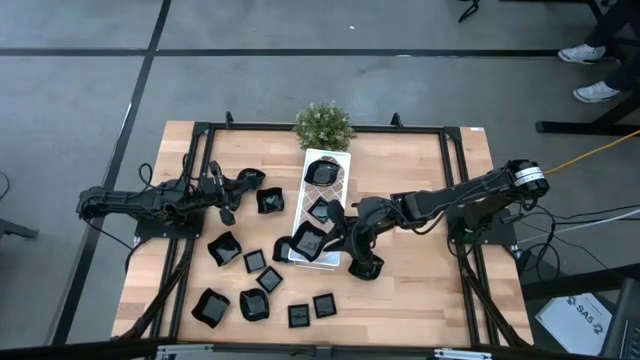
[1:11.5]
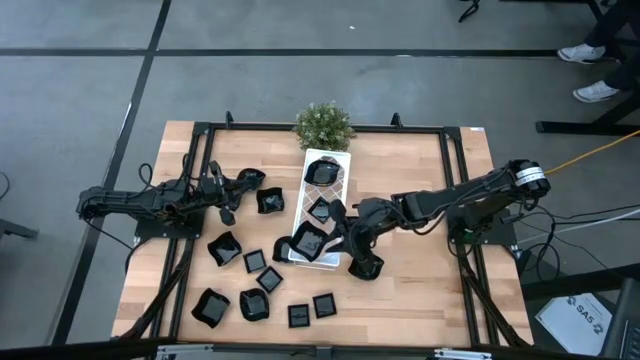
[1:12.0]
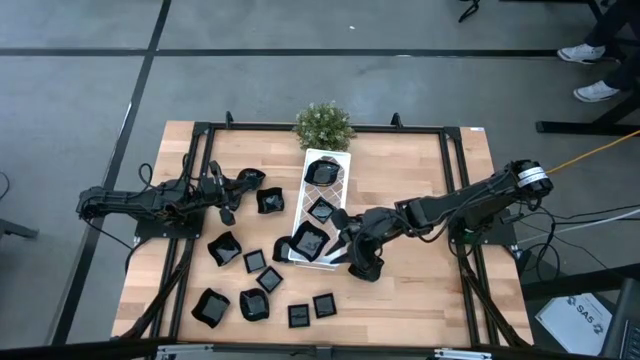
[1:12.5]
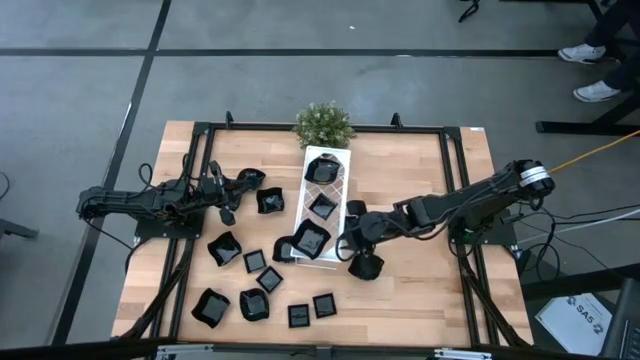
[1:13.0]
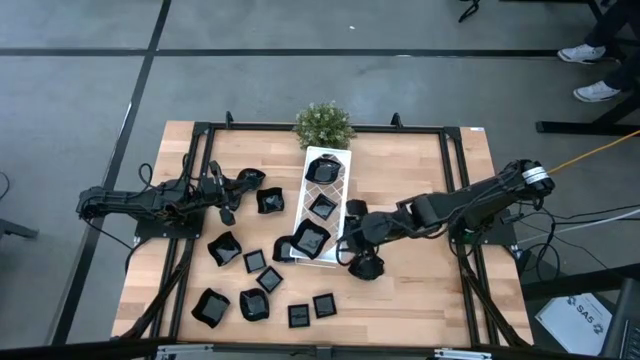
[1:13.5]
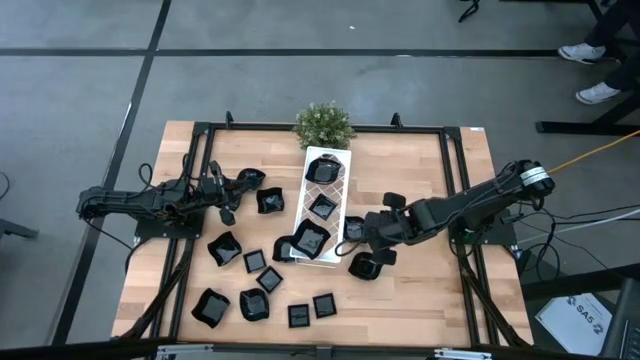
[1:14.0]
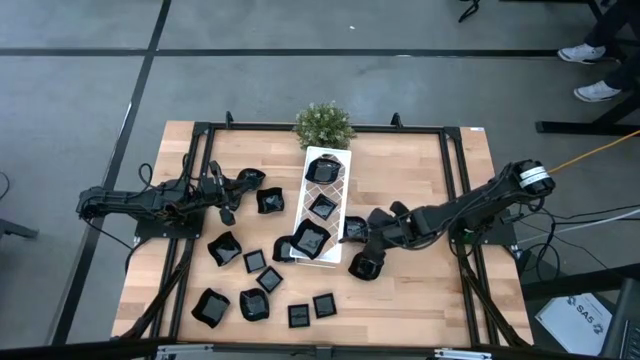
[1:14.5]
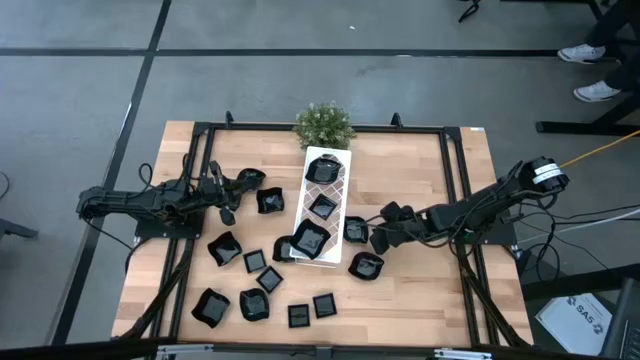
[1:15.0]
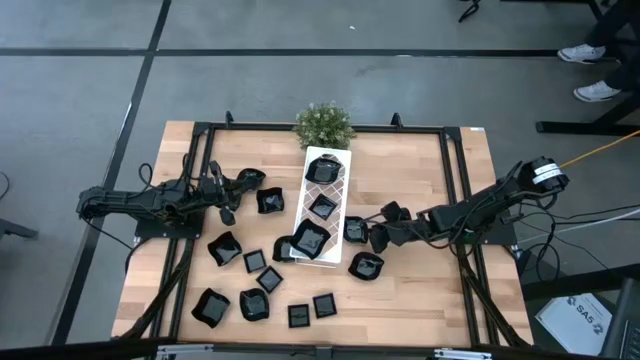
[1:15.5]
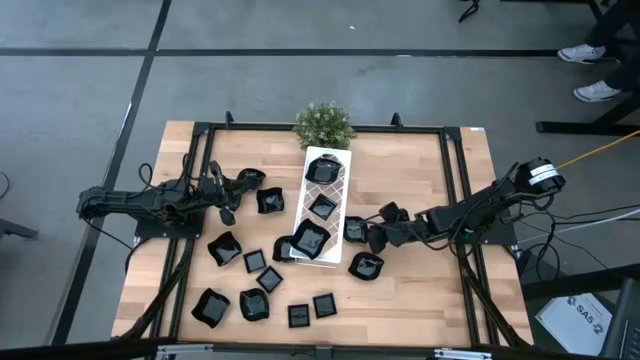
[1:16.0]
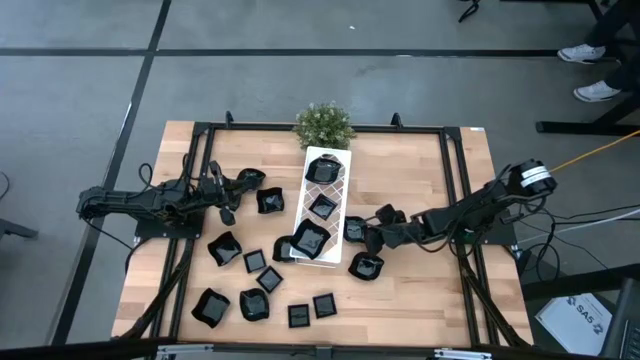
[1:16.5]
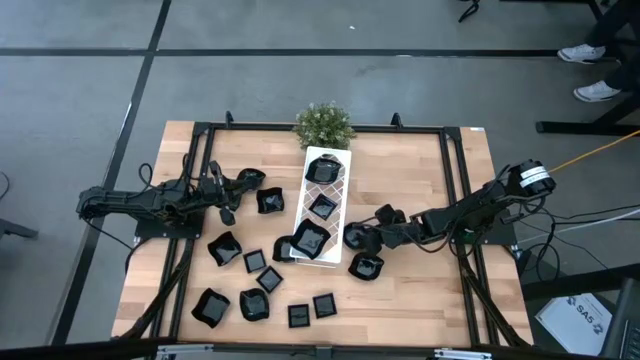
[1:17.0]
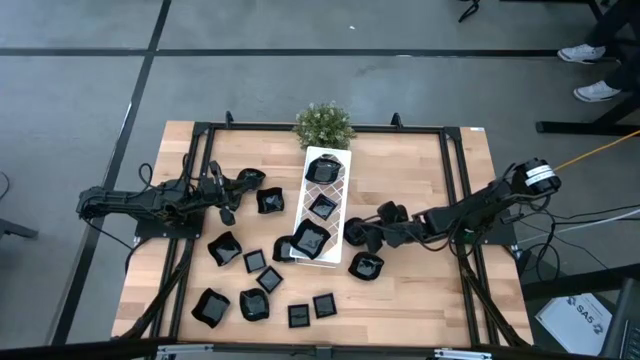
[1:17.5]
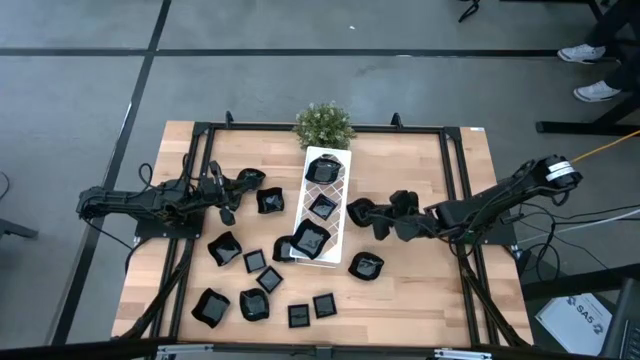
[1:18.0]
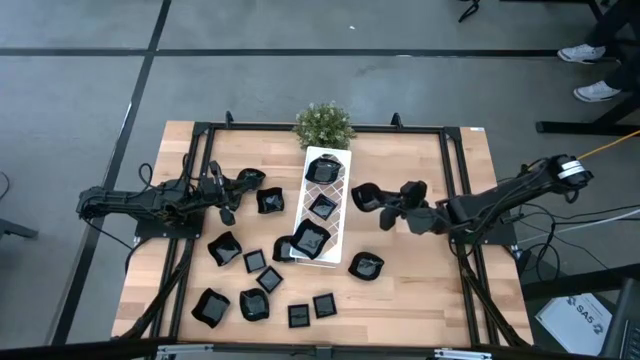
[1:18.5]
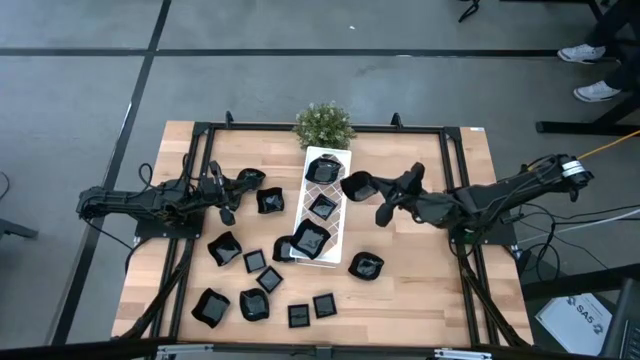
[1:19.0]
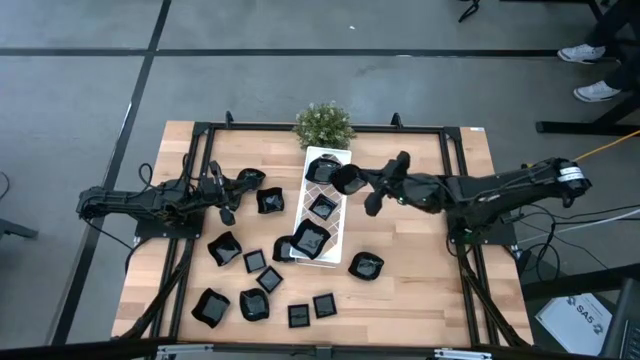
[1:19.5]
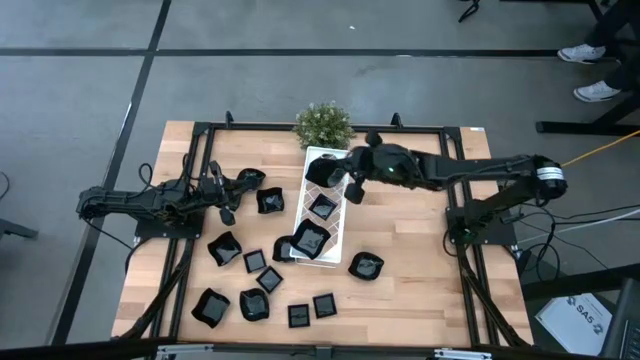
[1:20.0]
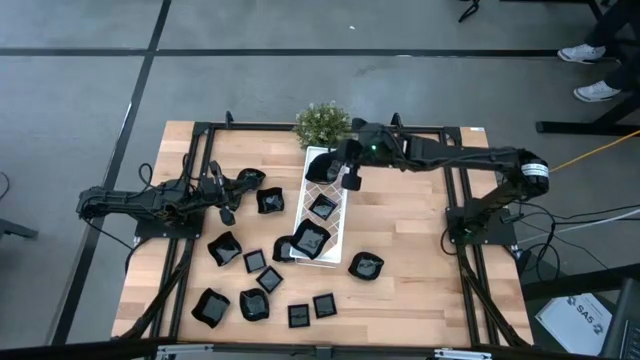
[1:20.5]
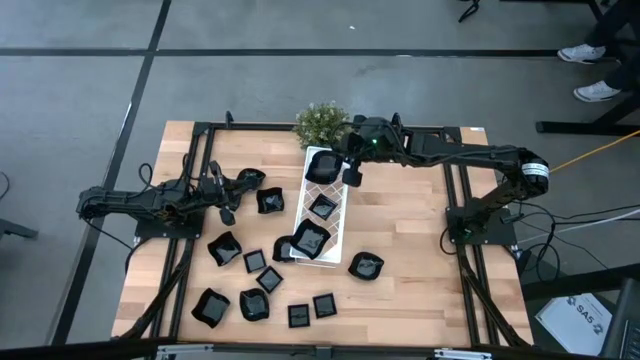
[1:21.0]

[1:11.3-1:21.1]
Task: Pick & Place Mini shaped plates
Stack the leaf shaped plate on top of the leaf shaped plate on the shelf

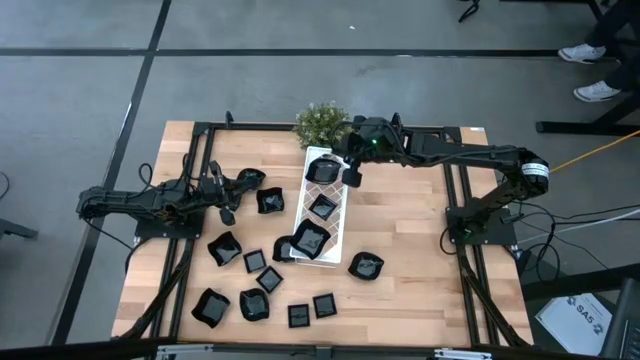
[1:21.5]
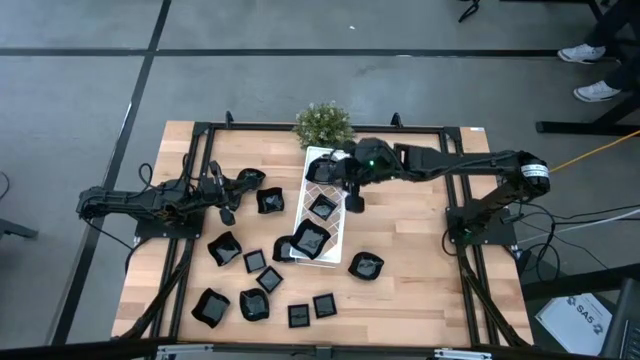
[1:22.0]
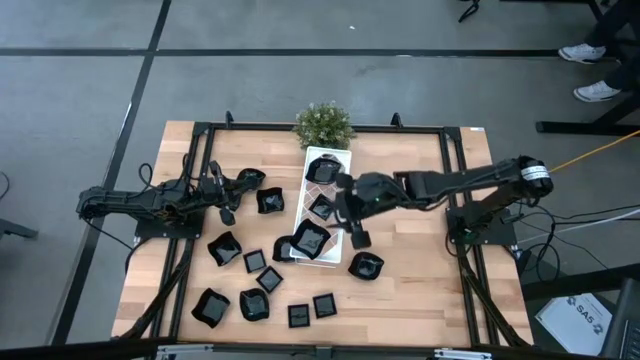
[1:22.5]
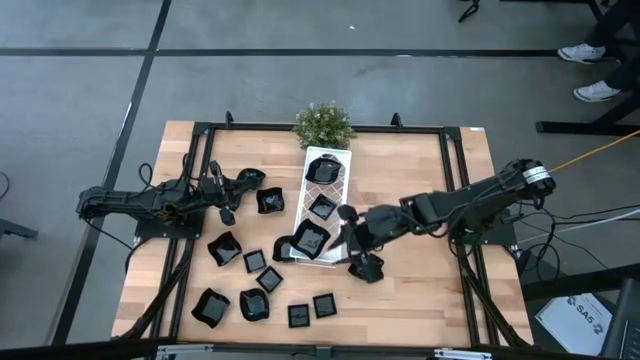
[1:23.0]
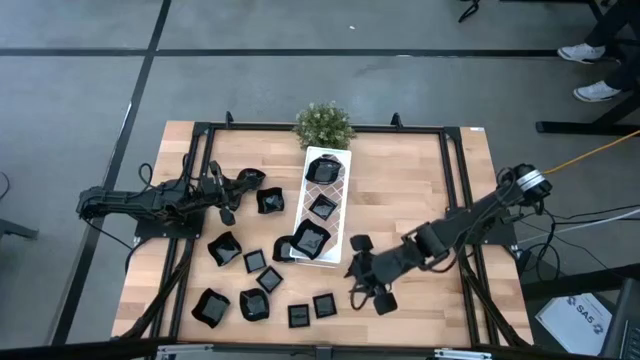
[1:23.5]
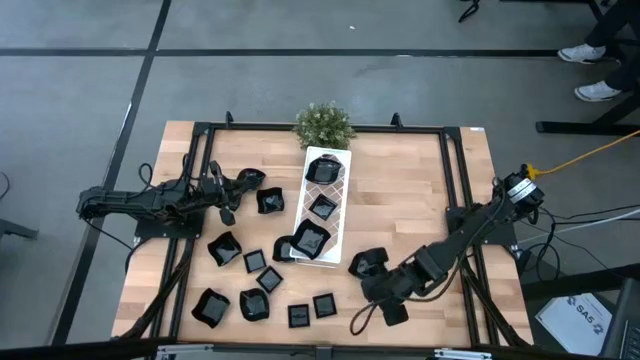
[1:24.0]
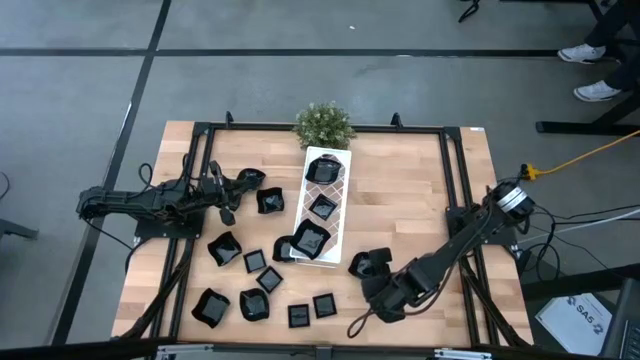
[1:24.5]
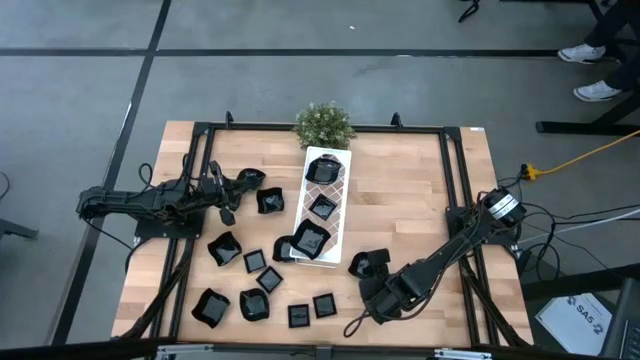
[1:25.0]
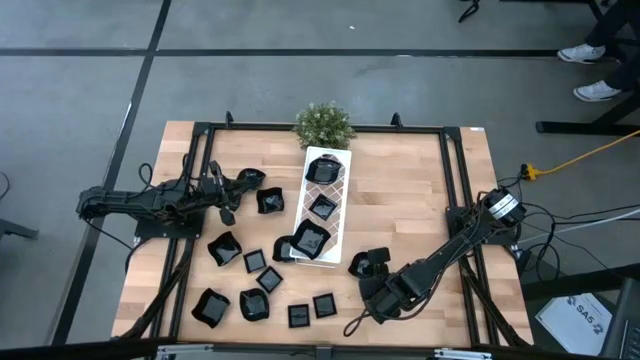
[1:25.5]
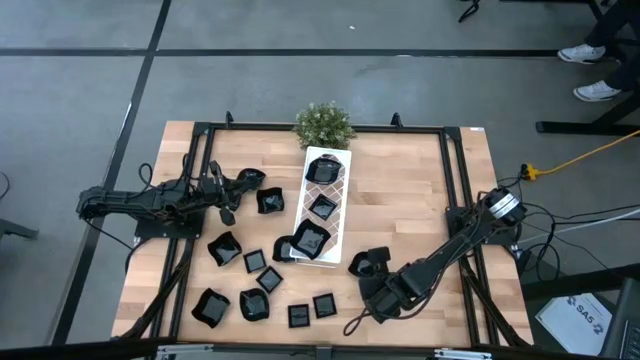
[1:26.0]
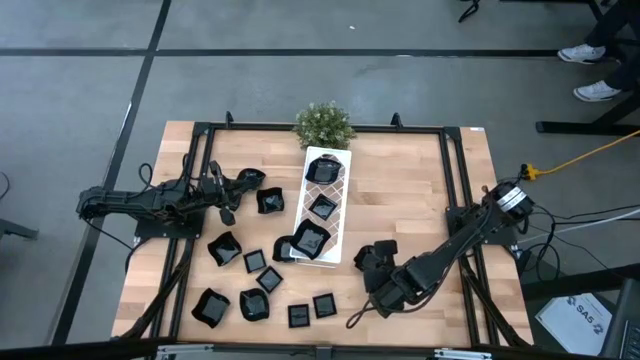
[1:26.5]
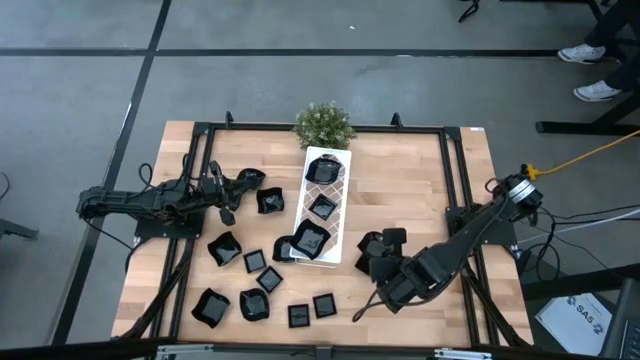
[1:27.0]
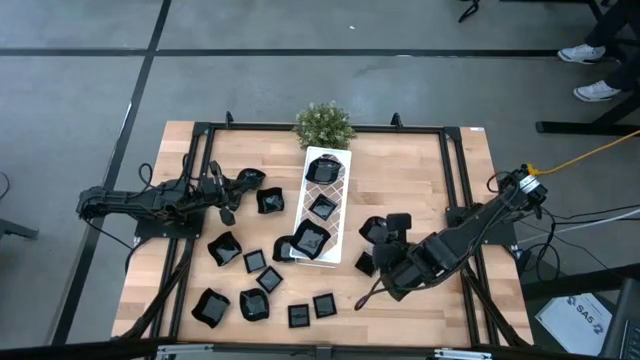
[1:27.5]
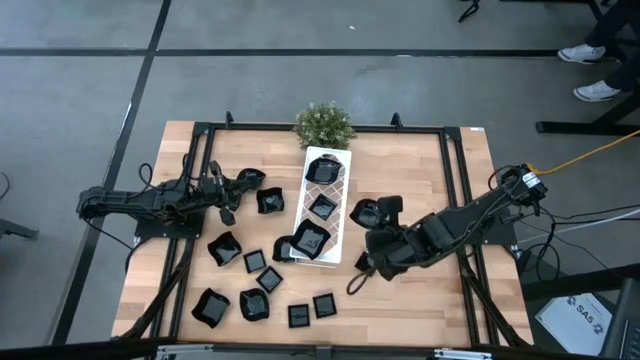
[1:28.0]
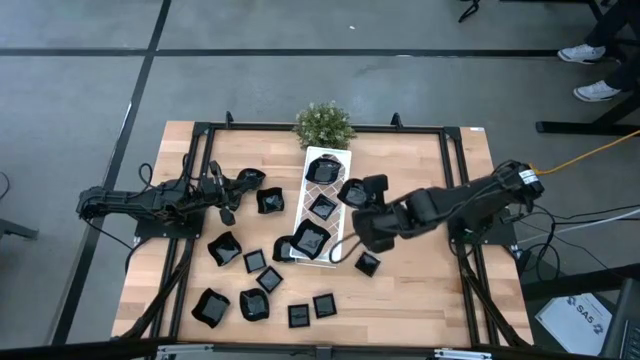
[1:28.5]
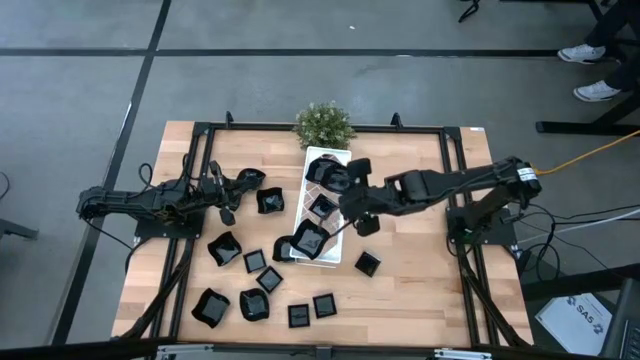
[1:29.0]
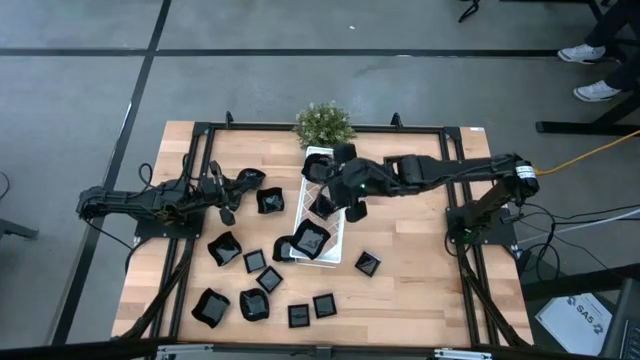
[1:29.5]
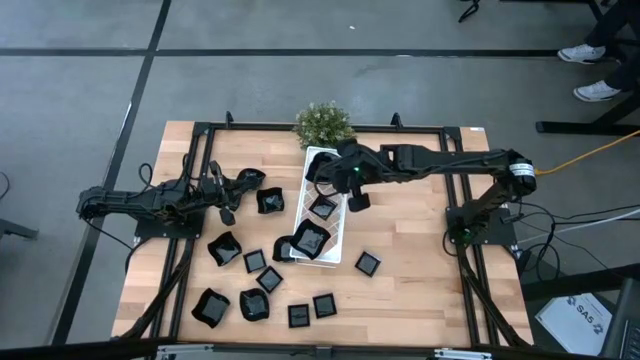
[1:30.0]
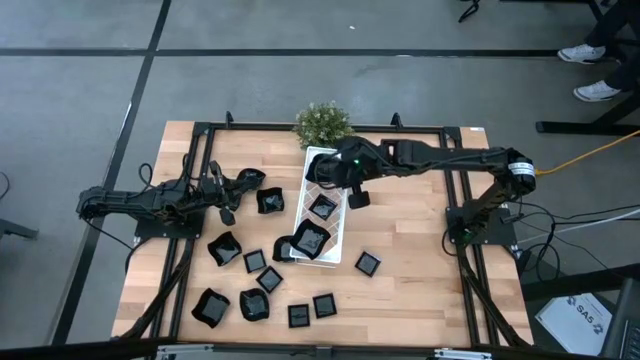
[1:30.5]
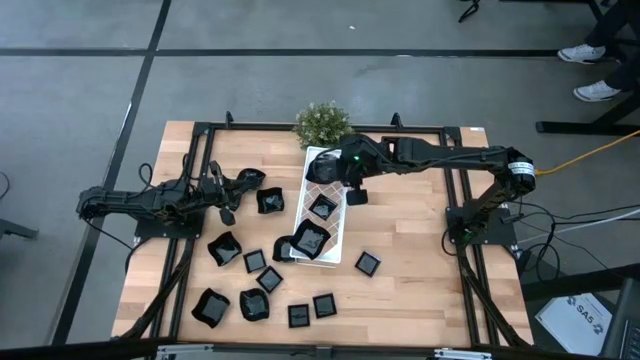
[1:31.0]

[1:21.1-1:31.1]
Stack the leaf shaped plate on top of the leaf shaped plate on the shelf
